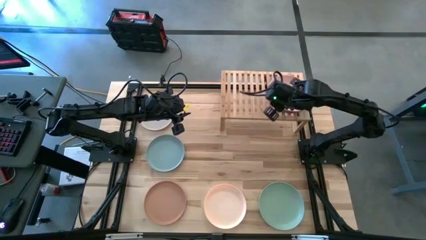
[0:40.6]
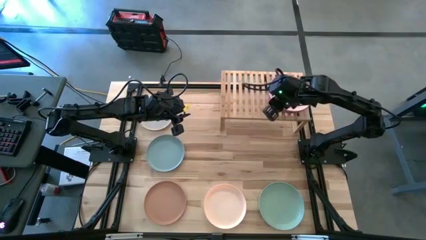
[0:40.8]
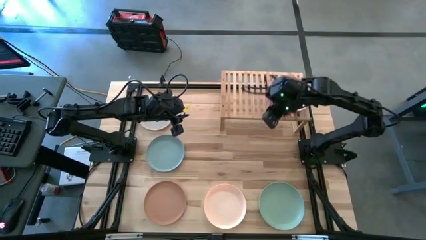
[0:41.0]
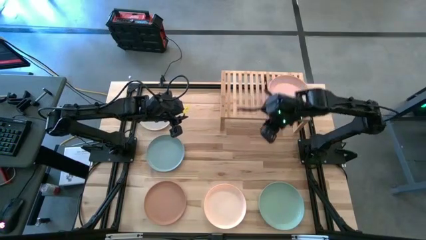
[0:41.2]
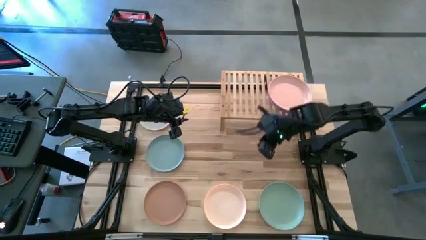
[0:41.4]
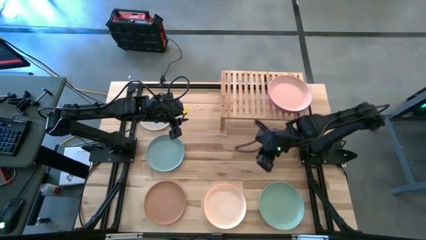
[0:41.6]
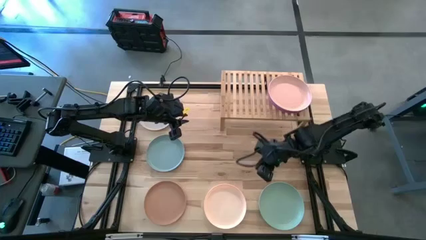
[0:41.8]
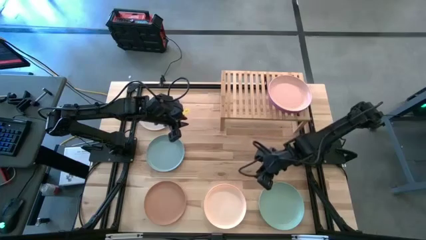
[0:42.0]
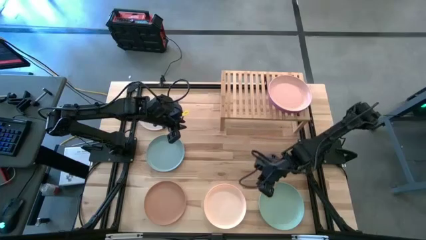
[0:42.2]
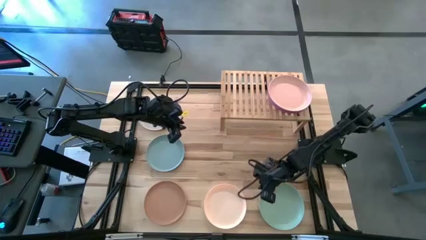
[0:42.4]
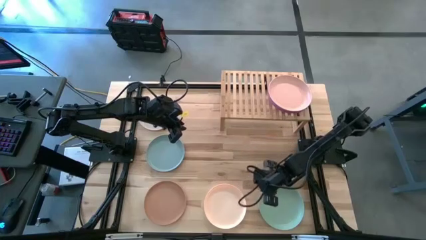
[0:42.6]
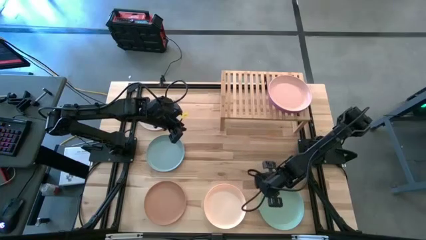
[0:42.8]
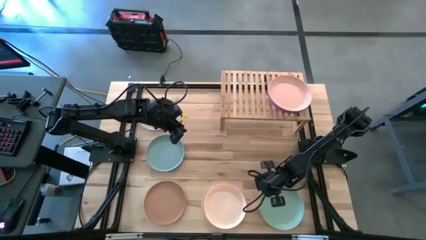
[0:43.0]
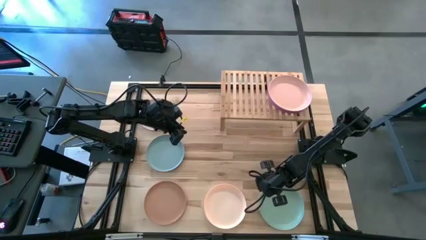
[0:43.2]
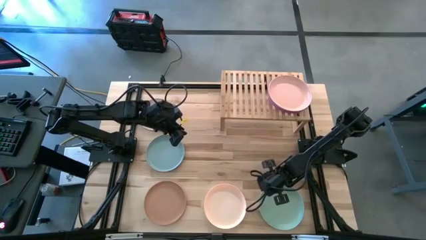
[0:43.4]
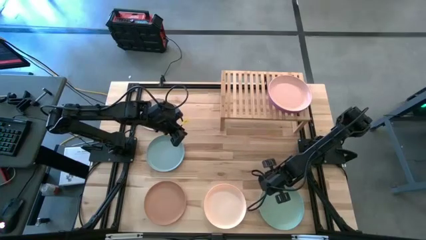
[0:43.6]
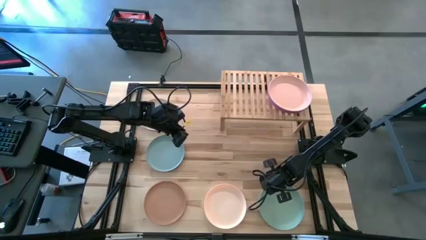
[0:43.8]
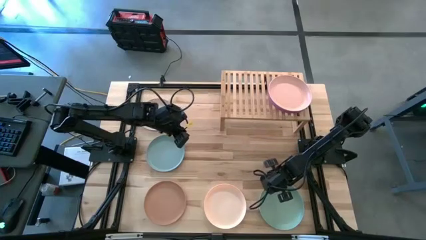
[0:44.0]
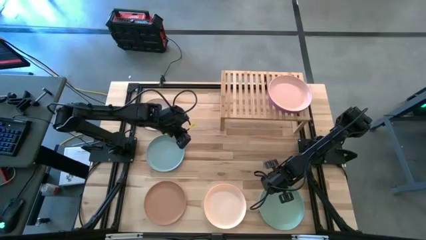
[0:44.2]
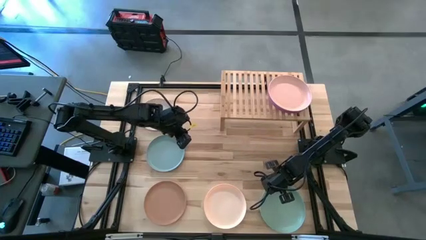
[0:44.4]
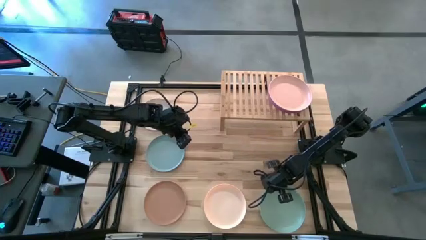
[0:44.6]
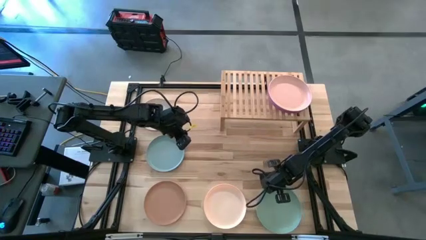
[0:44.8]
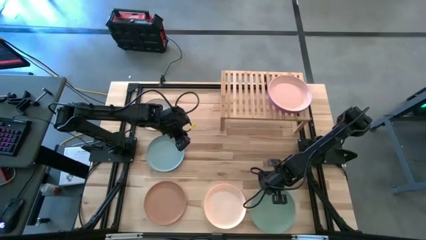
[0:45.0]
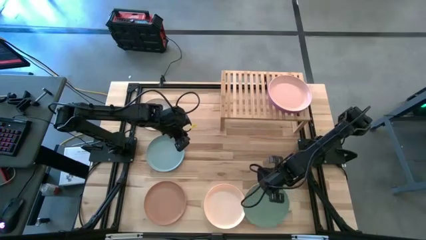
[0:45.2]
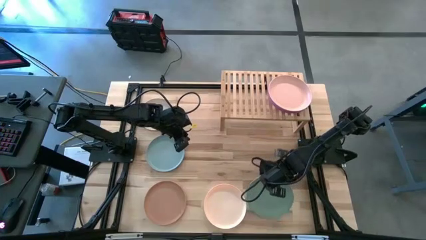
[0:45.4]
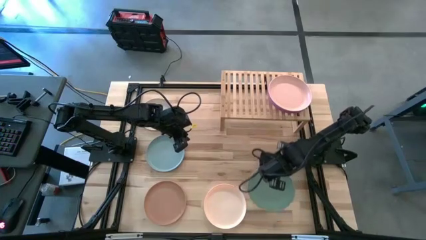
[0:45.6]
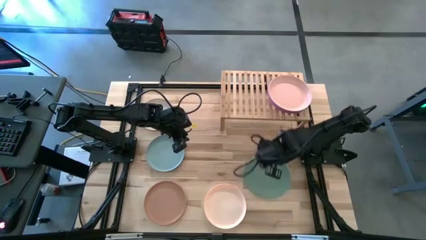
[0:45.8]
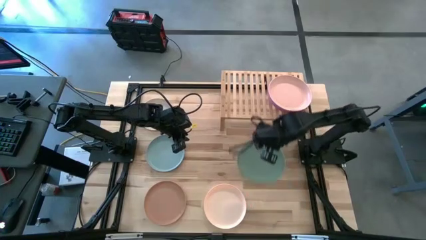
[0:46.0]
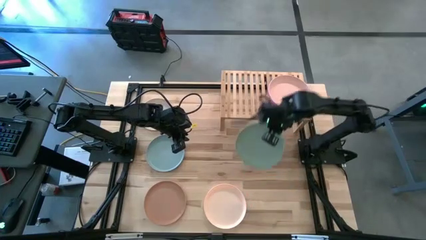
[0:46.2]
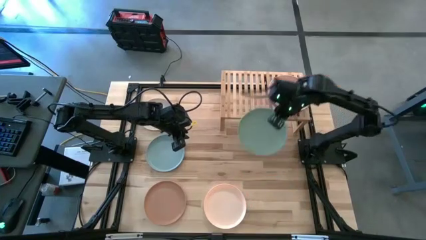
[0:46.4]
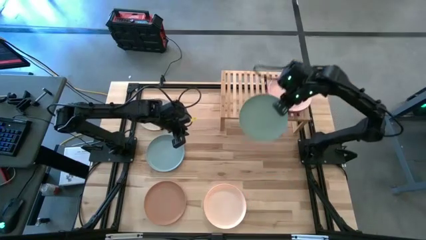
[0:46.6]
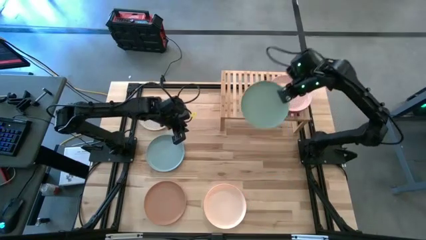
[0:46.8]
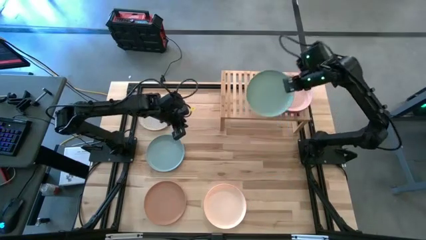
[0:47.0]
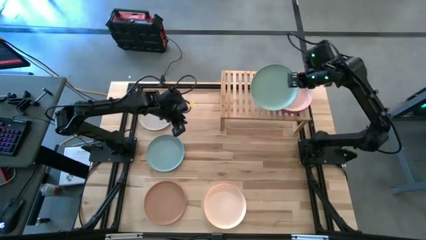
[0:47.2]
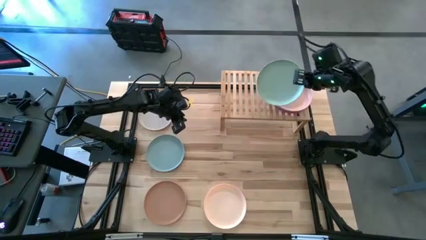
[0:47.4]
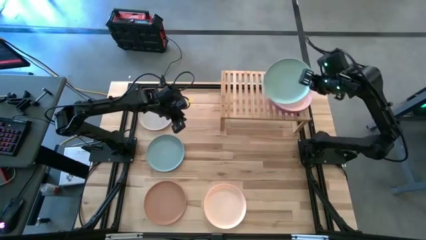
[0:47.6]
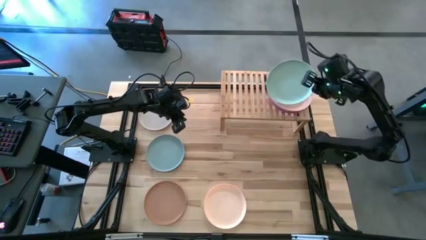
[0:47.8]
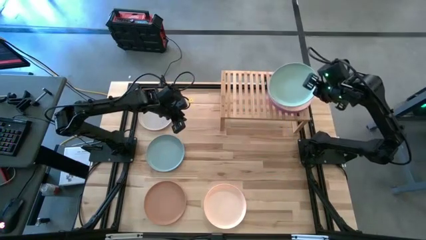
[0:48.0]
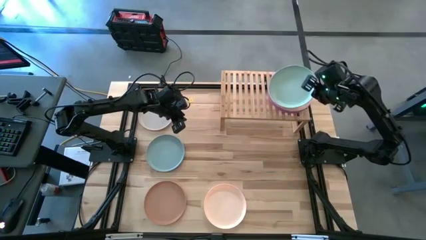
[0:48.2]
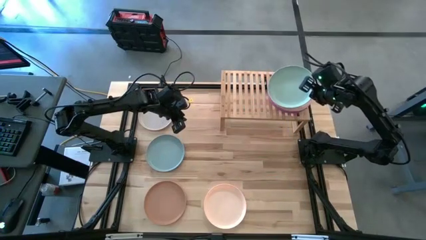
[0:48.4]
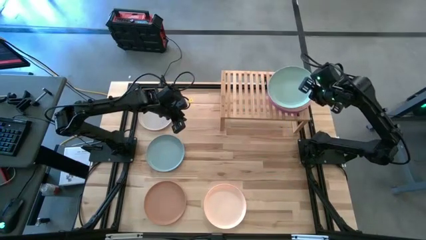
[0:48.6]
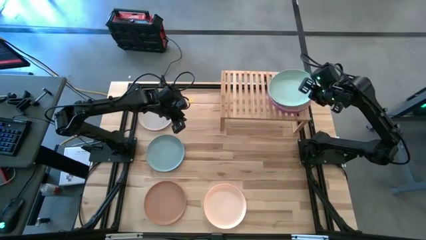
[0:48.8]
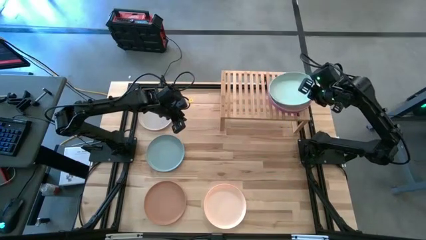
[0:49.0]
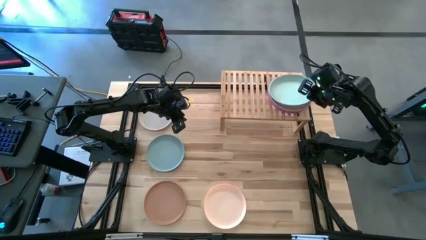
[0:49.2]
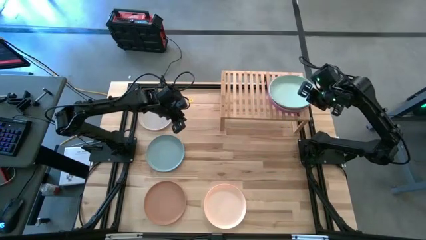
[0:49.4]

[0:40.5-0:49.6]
Task: Place and stack plates onto a shelf
Stack the green plate on top of the light orange plate on the shelf
